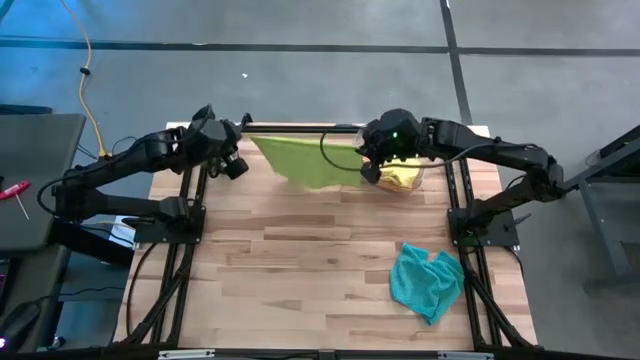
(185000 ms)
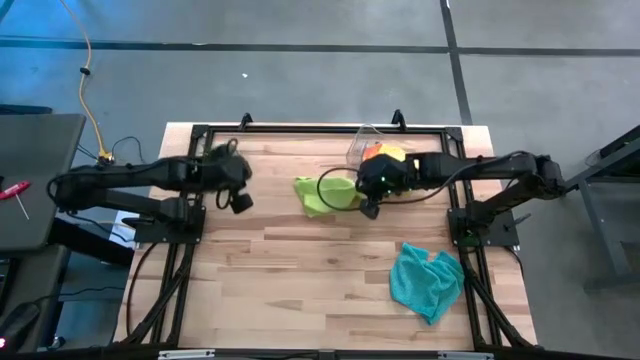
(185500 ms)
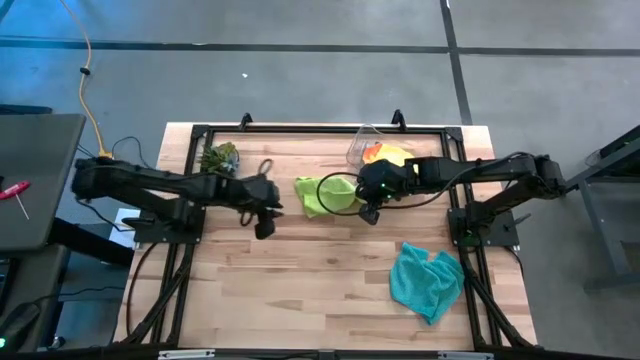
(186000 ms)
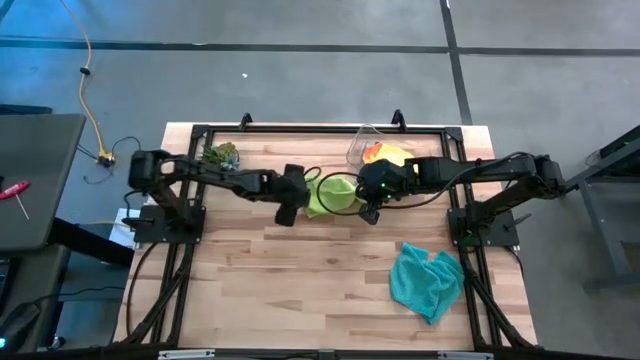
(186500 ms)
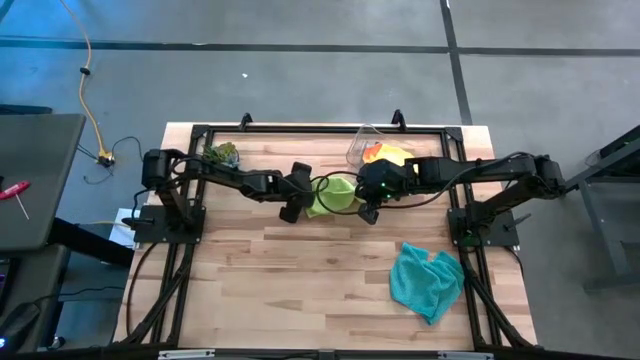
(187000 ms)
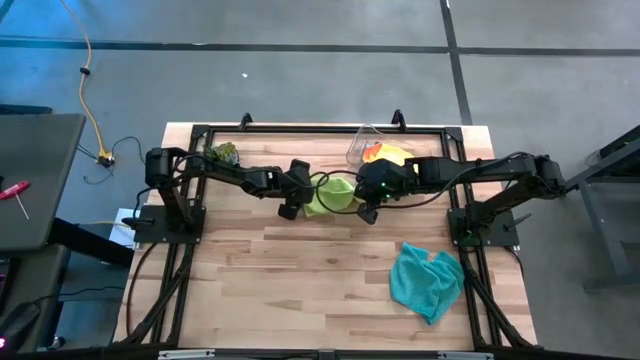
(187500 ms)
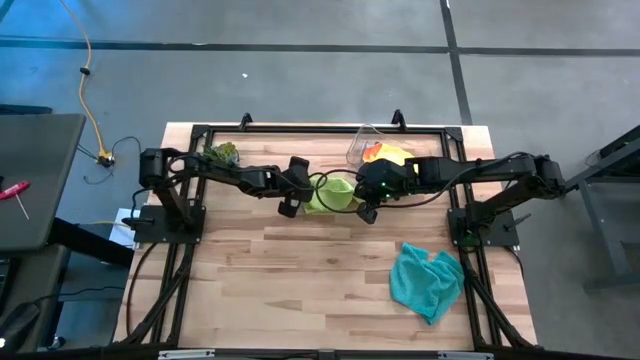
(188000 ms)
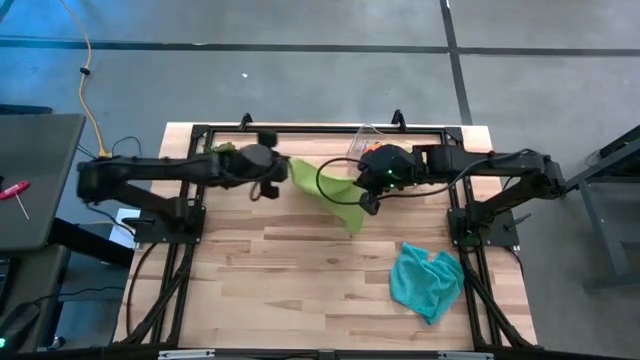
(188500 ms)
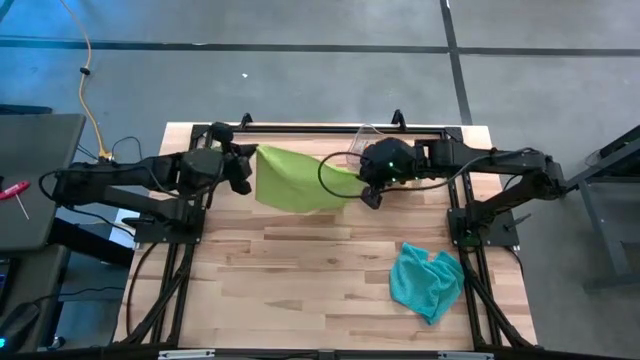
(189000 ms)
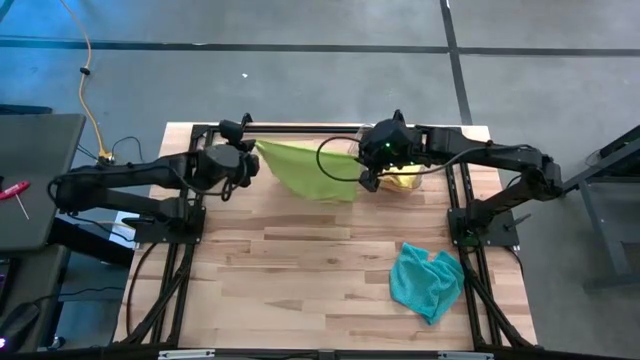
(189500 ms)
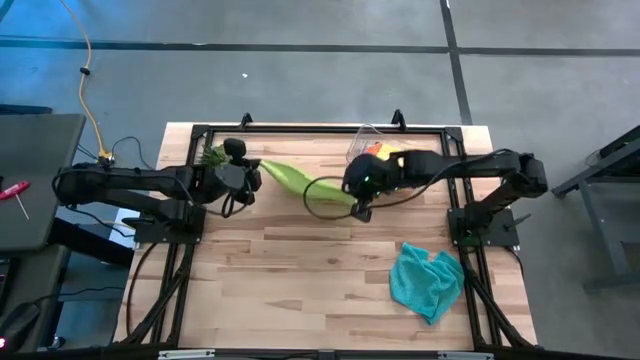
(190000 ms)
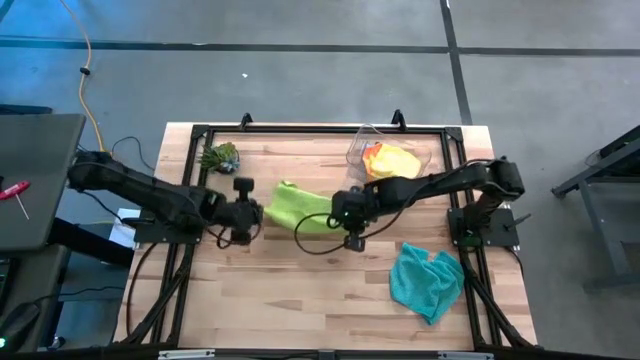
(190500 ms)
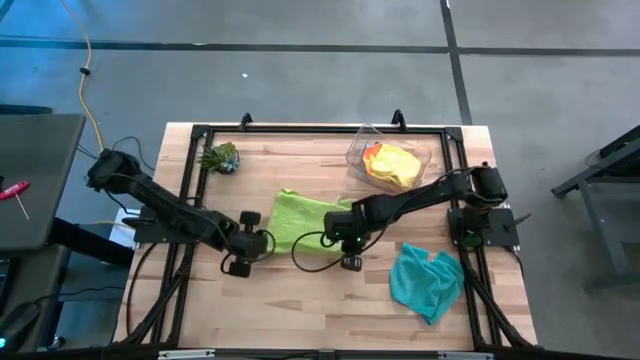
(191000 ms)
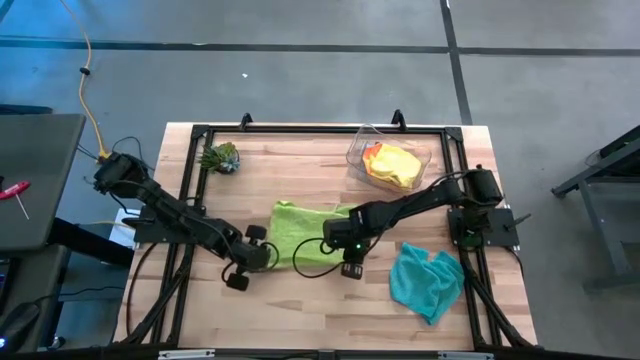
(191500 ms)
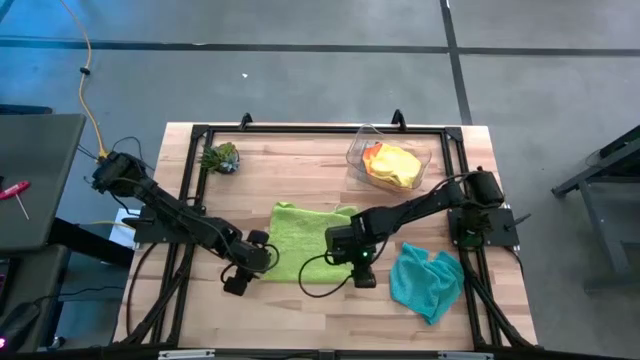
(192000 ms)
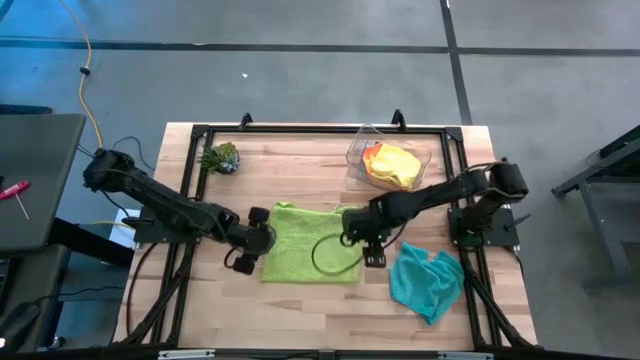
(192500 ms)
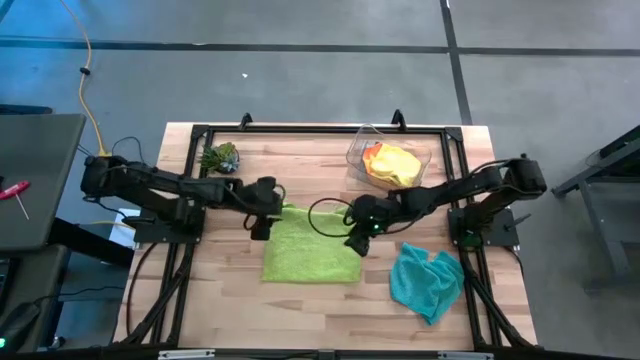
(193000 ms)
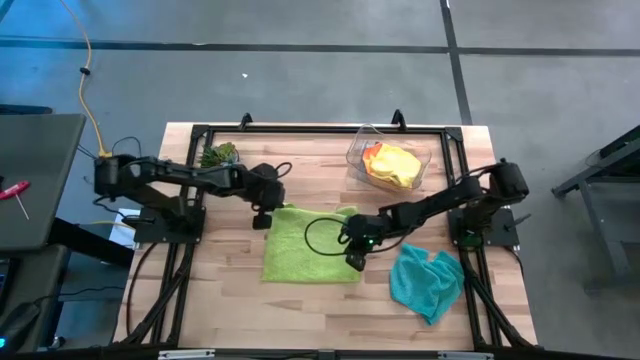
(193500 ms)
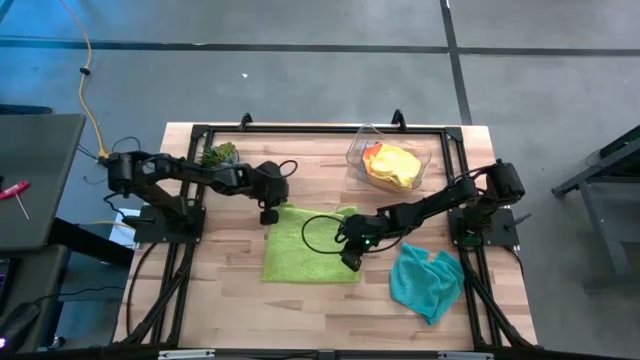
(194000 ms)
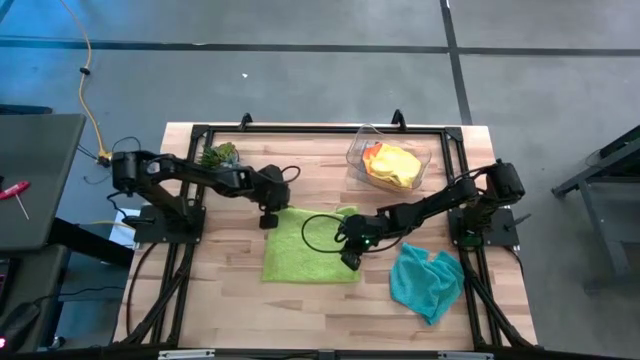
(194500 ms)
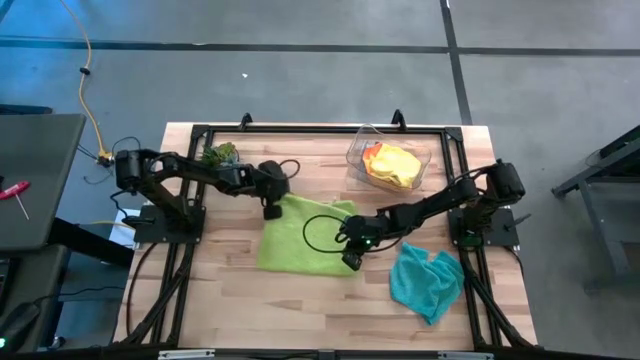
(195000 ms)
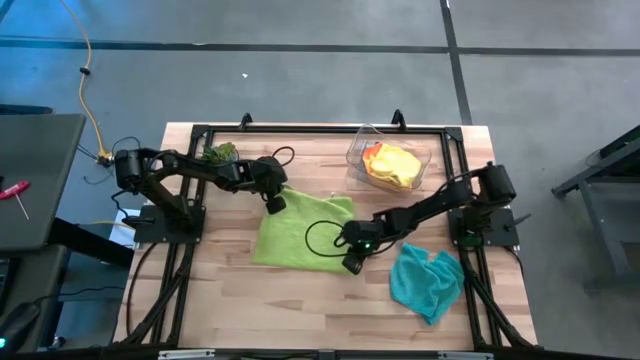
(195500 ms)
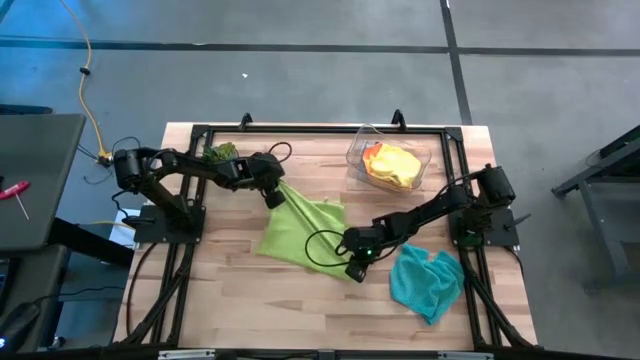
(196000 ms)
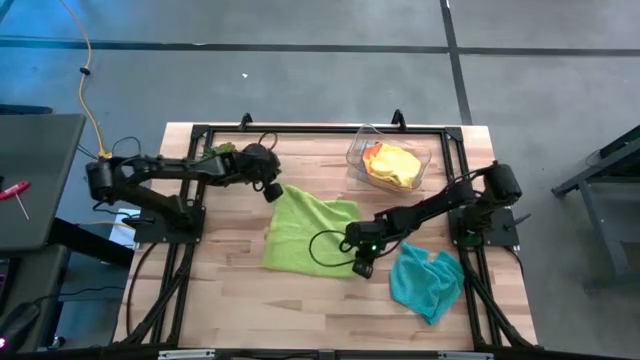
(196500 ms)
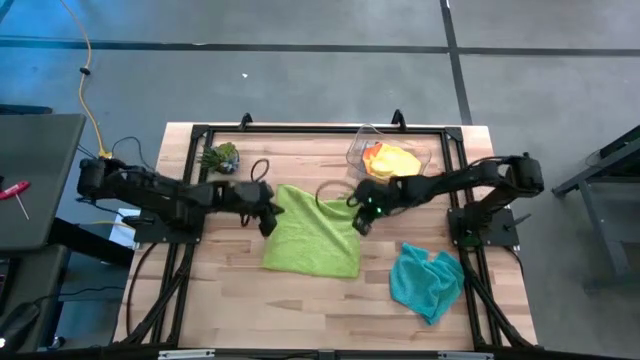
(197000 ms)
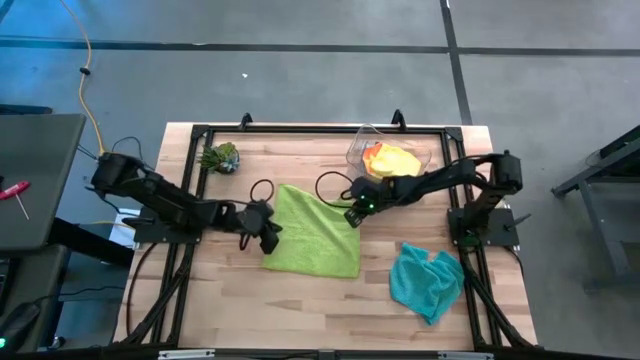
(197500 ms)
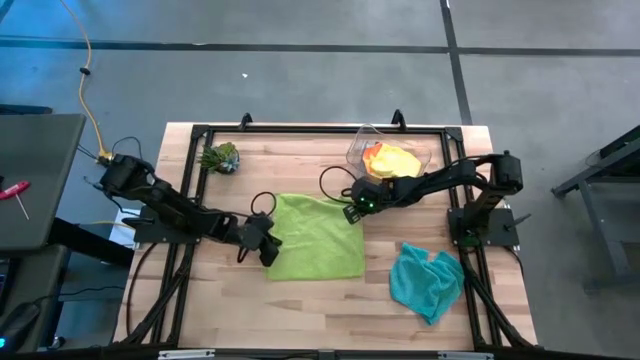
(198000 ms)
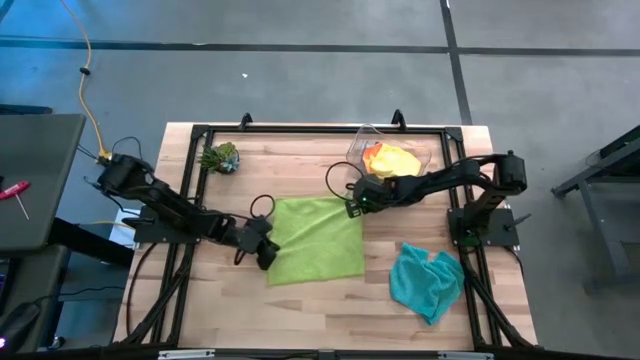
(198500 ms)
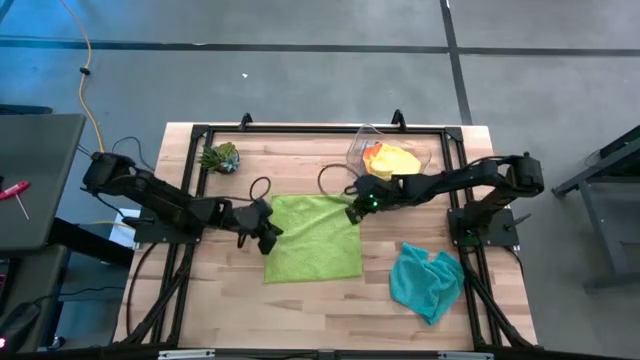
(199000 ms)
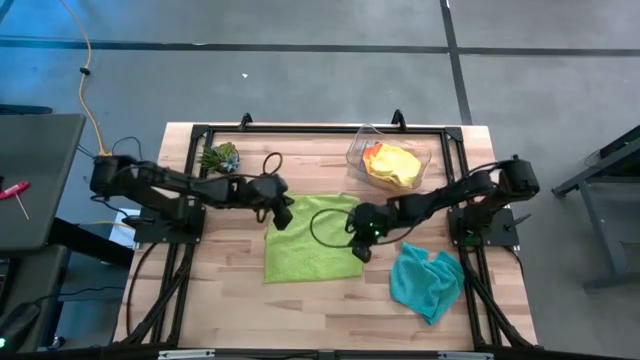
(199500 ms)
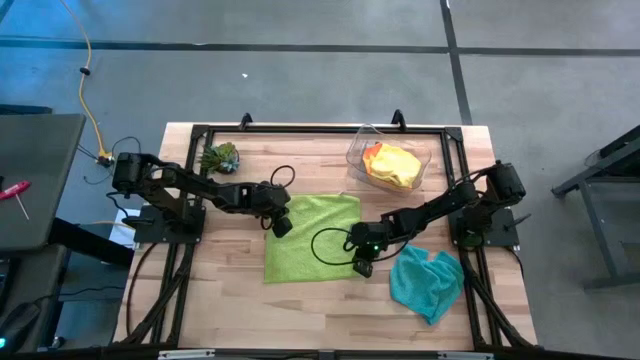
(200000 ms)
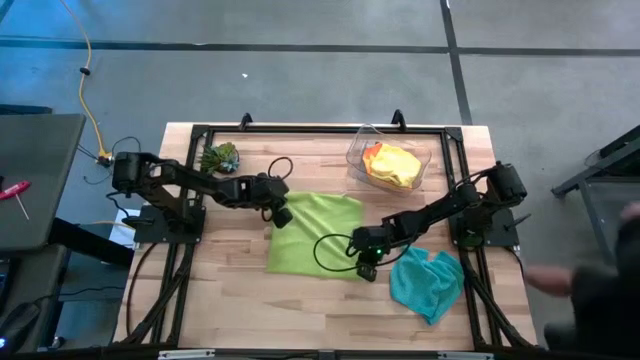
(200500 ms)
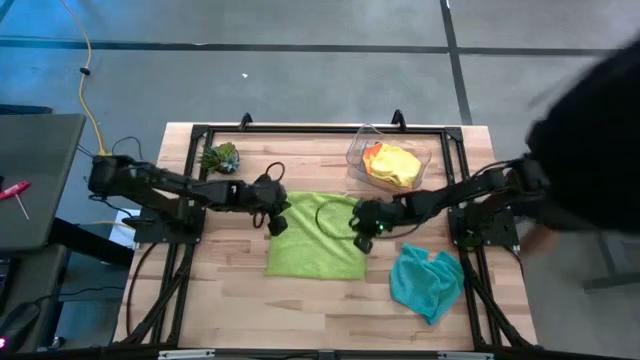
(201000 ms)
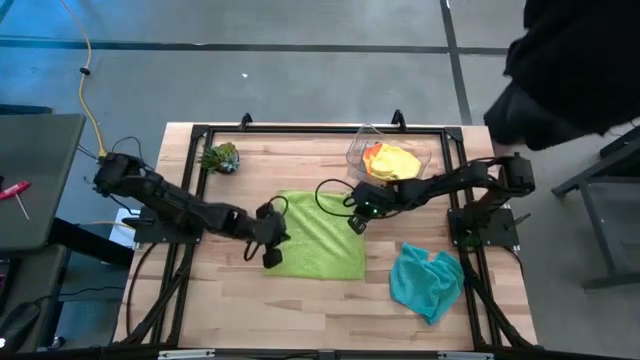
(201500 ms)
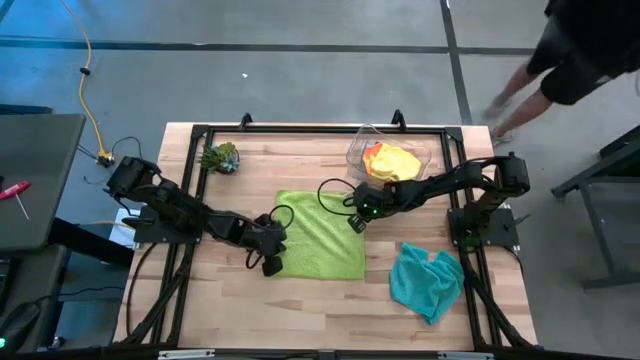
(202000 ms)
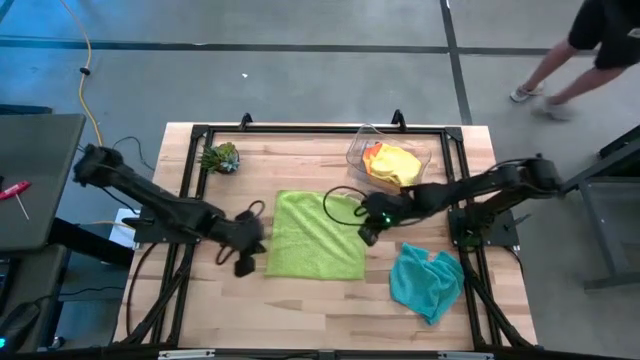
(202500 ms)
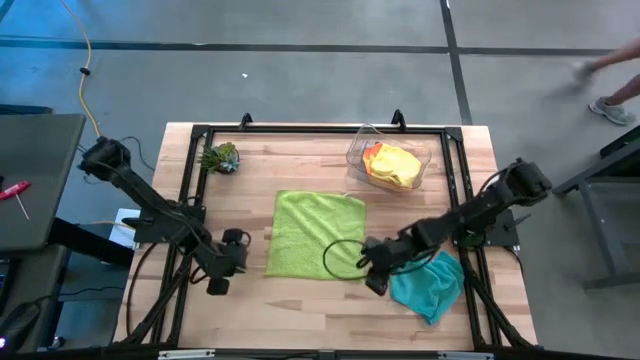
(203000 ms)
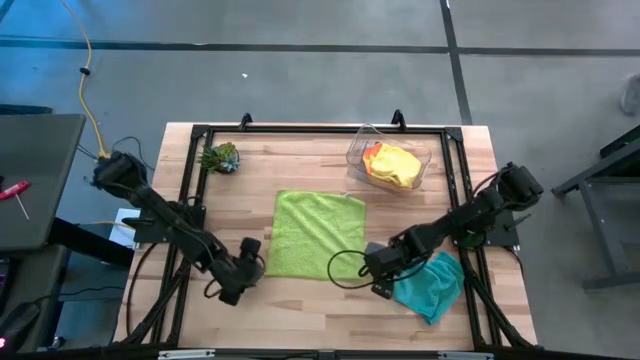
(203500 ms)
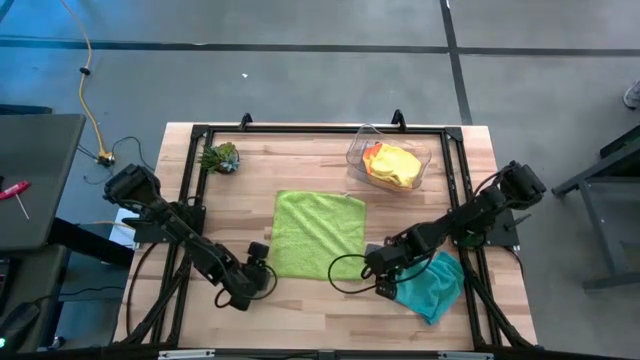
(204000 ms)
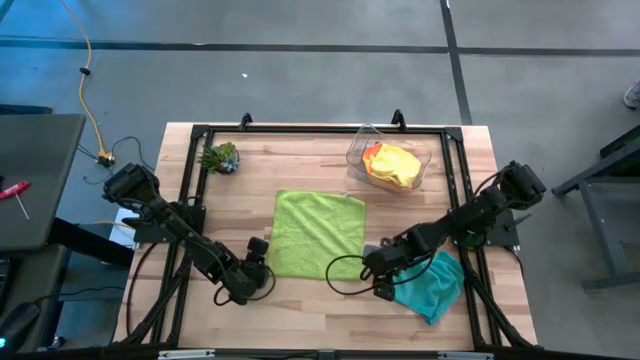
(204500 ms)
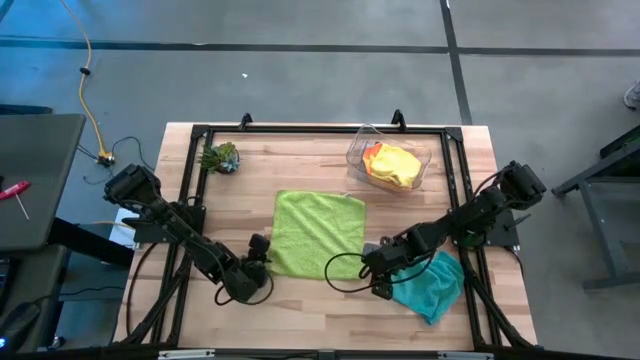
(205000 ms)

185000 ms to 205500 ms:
Task: Fold microfiber towels
Fold the green microfiber towel

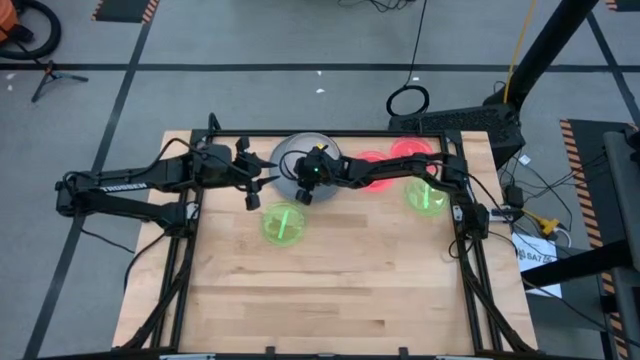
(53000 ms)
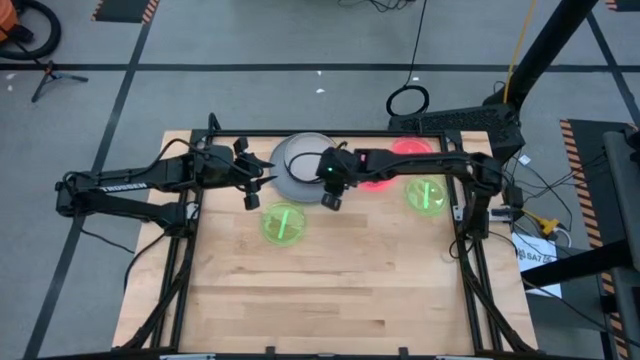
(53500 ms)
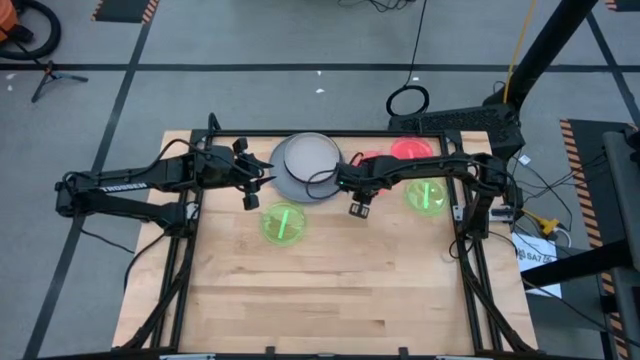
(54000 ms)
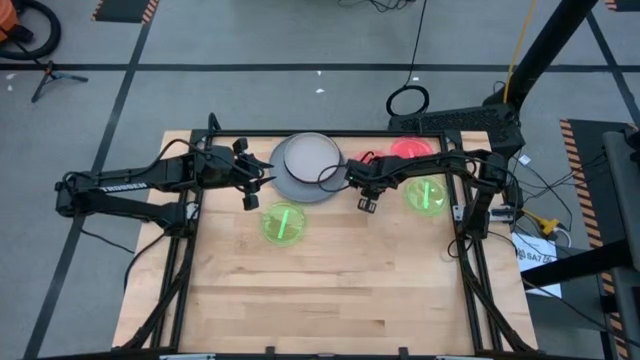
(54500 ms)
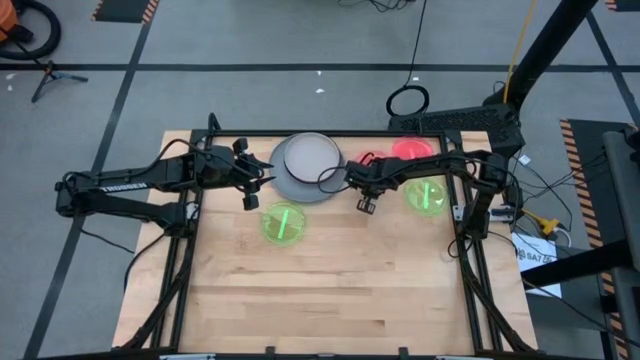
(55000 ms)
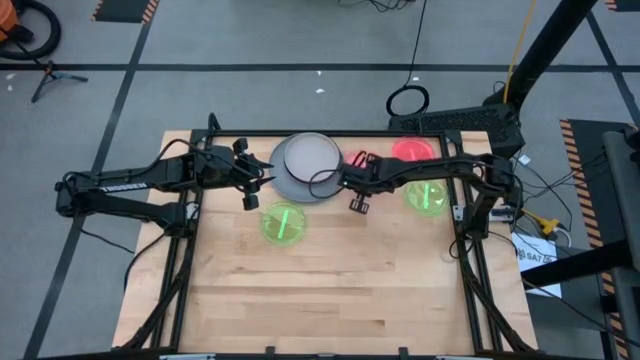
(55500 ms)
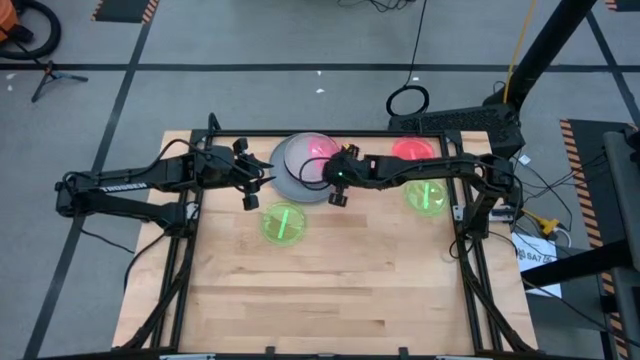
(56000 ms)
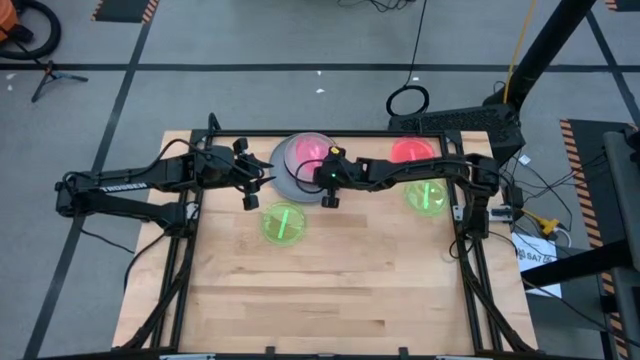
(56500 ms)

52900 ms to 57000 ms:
Task: Stack plastic plates
Stack the left pink plate on top of the light gray plate
